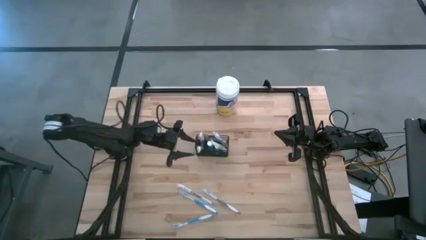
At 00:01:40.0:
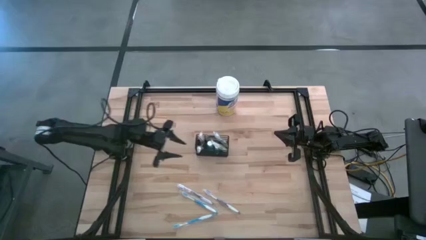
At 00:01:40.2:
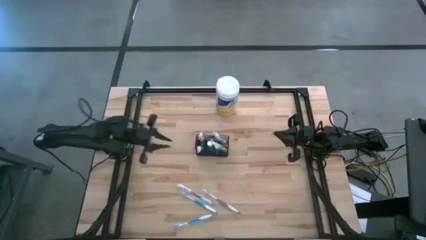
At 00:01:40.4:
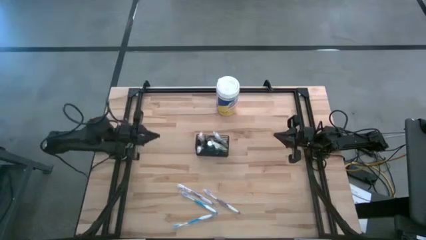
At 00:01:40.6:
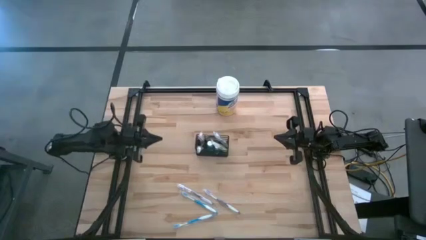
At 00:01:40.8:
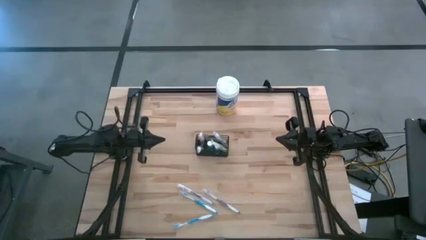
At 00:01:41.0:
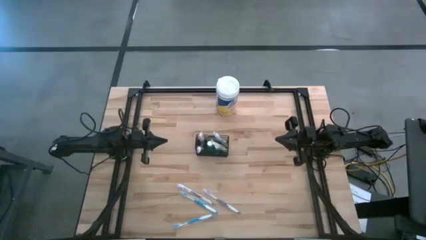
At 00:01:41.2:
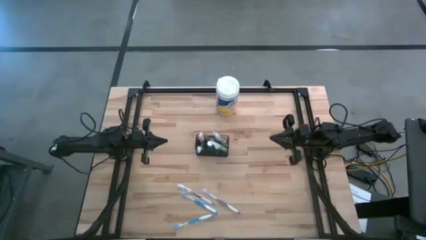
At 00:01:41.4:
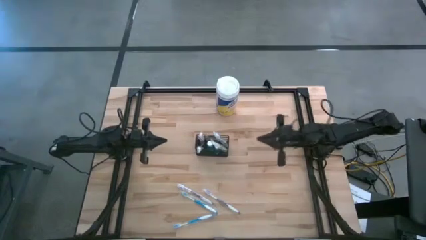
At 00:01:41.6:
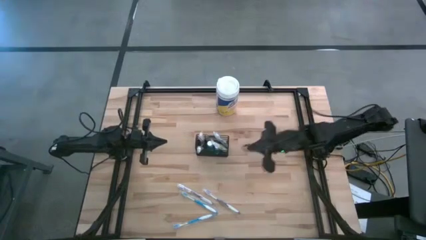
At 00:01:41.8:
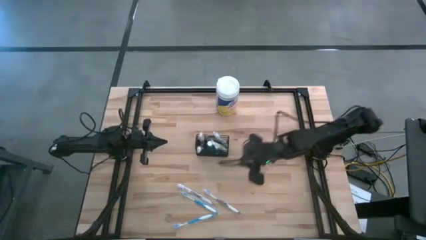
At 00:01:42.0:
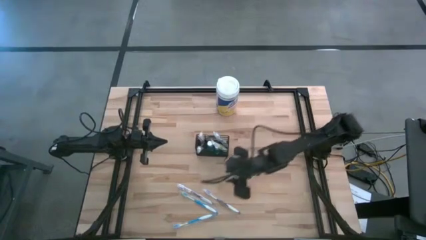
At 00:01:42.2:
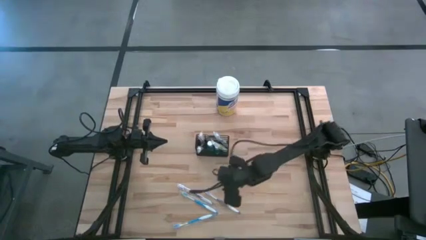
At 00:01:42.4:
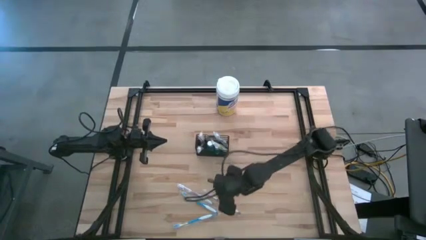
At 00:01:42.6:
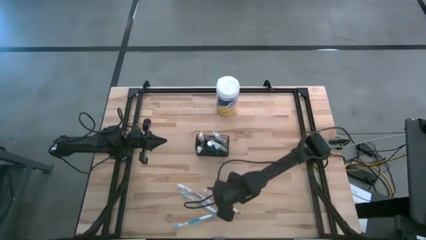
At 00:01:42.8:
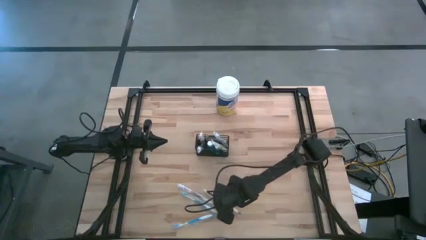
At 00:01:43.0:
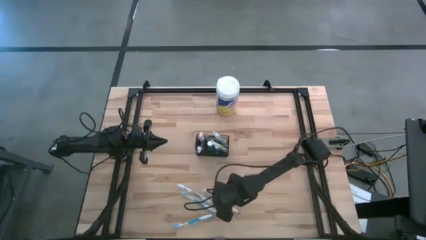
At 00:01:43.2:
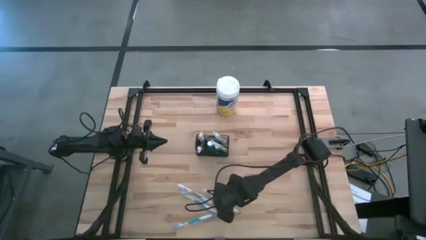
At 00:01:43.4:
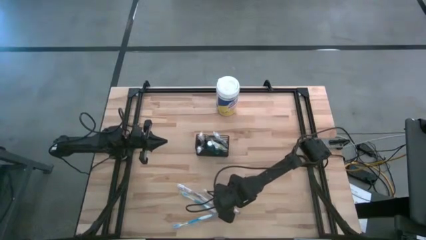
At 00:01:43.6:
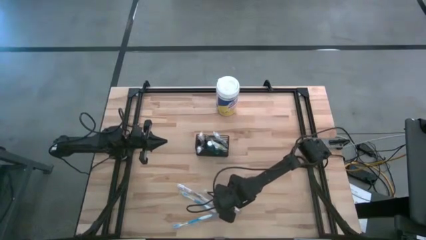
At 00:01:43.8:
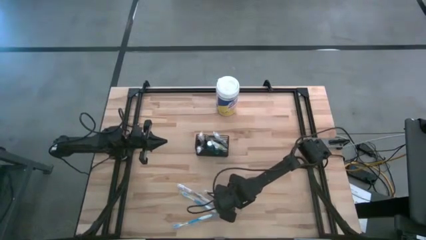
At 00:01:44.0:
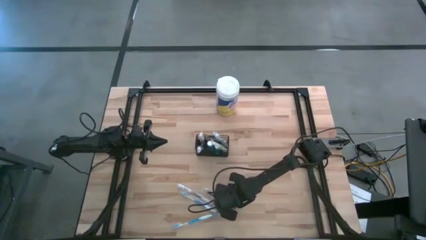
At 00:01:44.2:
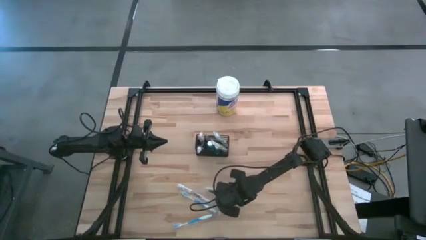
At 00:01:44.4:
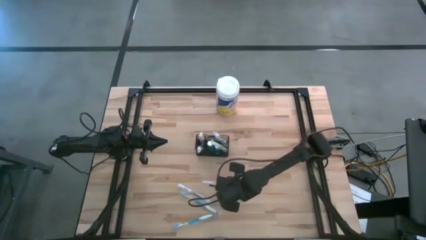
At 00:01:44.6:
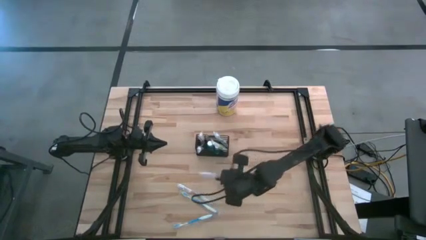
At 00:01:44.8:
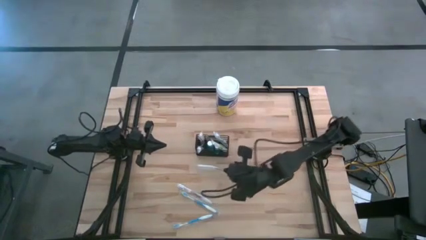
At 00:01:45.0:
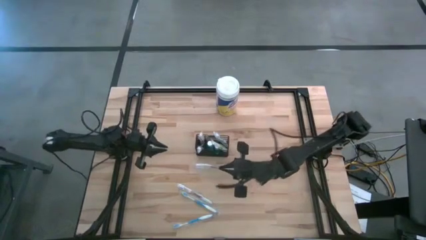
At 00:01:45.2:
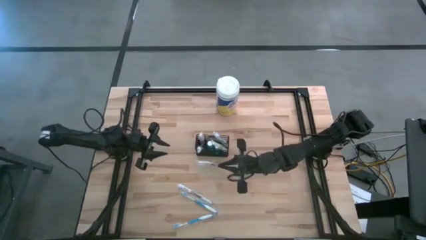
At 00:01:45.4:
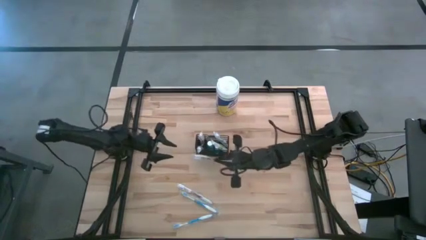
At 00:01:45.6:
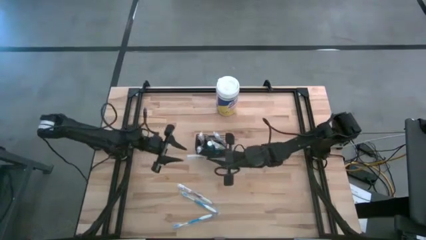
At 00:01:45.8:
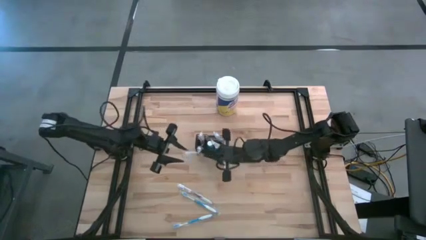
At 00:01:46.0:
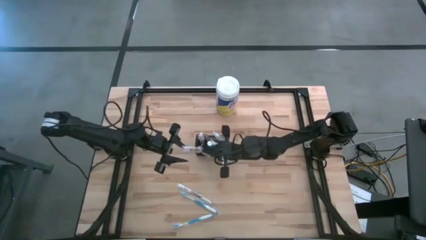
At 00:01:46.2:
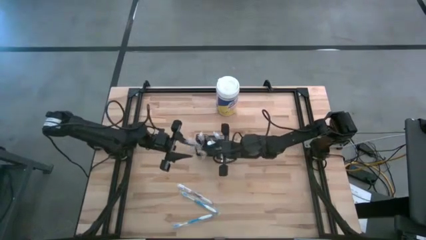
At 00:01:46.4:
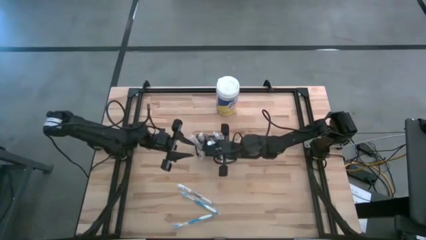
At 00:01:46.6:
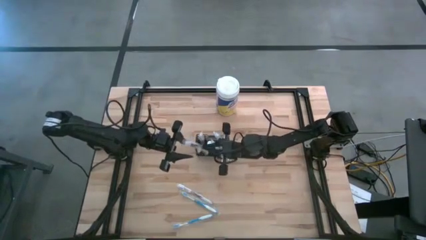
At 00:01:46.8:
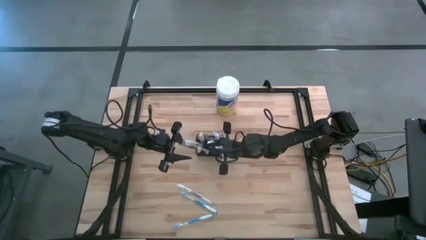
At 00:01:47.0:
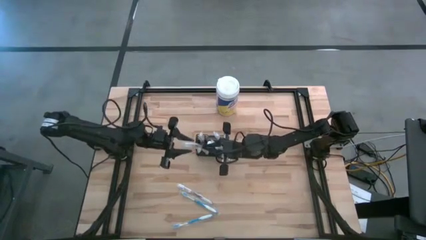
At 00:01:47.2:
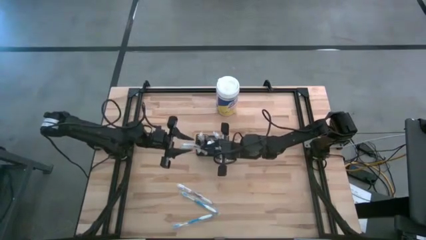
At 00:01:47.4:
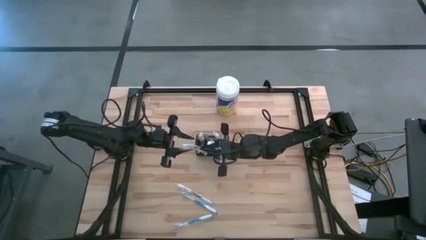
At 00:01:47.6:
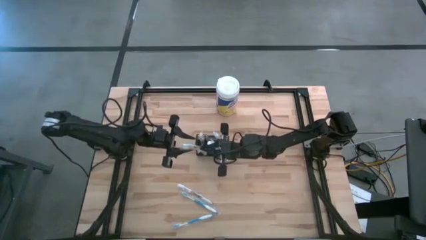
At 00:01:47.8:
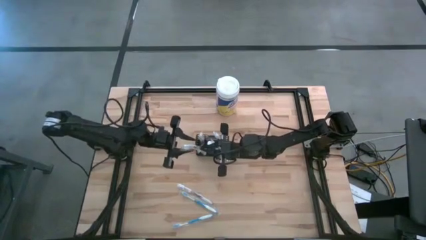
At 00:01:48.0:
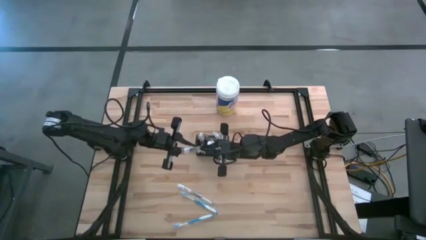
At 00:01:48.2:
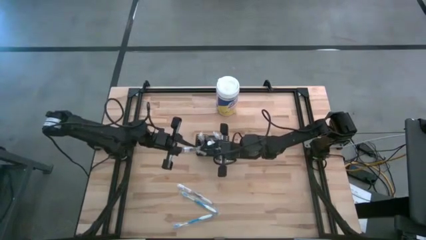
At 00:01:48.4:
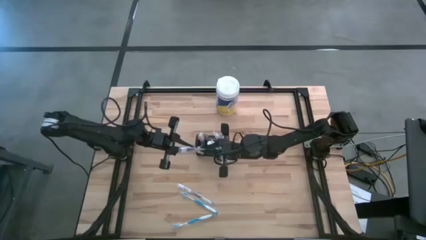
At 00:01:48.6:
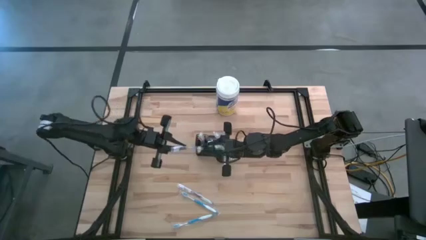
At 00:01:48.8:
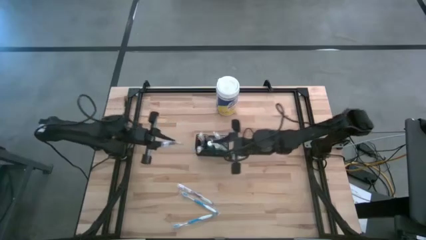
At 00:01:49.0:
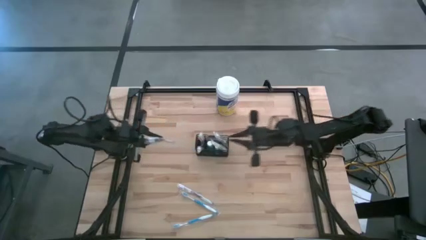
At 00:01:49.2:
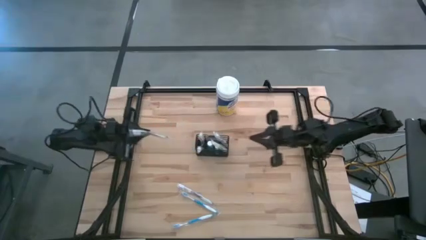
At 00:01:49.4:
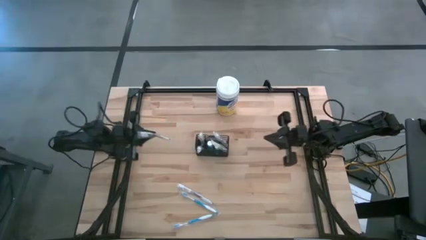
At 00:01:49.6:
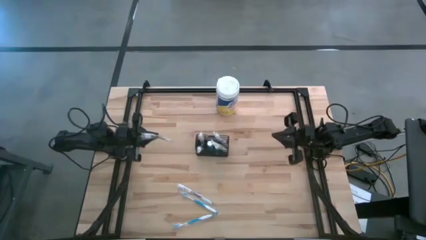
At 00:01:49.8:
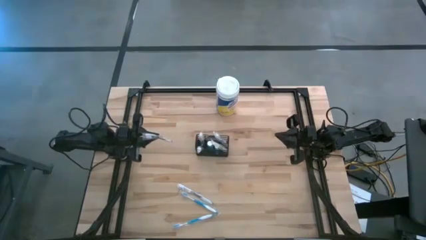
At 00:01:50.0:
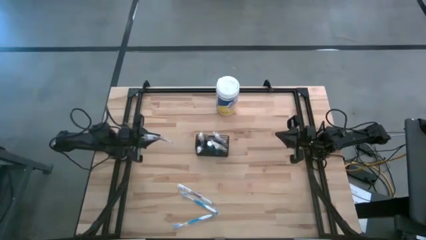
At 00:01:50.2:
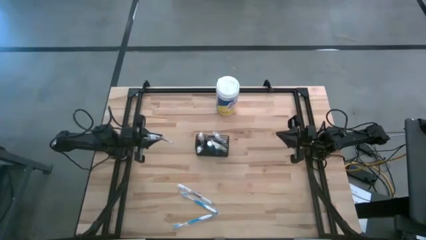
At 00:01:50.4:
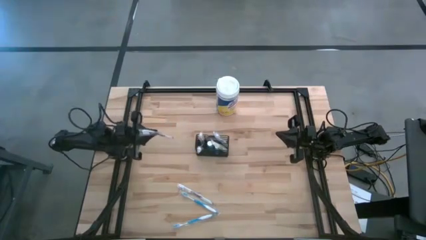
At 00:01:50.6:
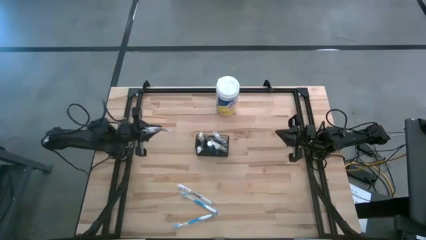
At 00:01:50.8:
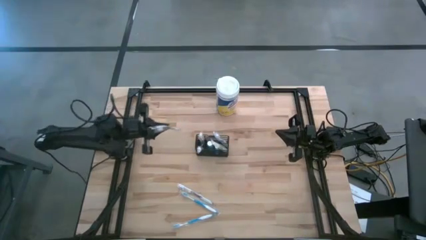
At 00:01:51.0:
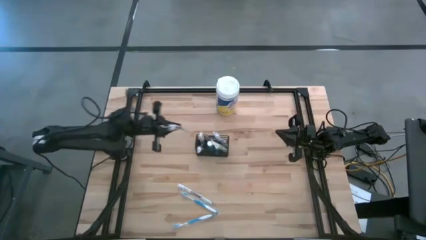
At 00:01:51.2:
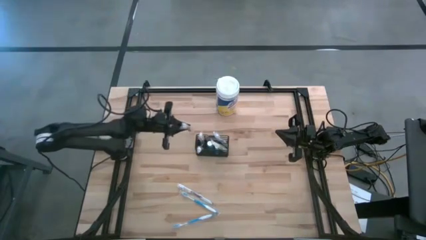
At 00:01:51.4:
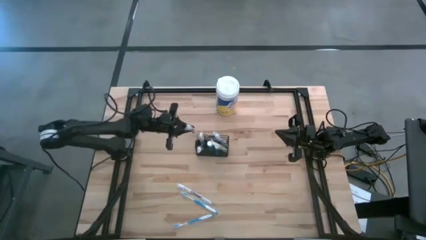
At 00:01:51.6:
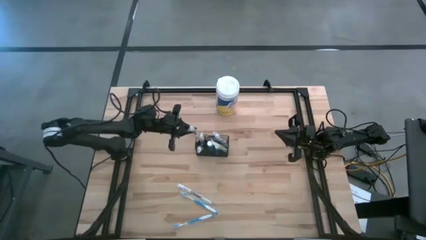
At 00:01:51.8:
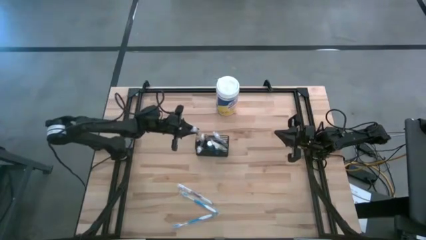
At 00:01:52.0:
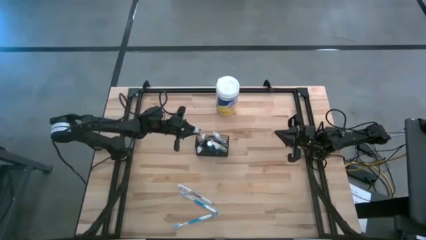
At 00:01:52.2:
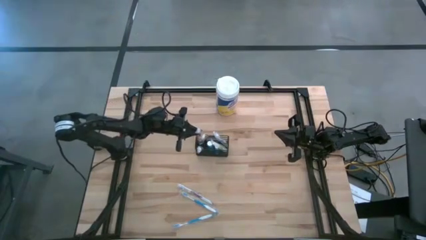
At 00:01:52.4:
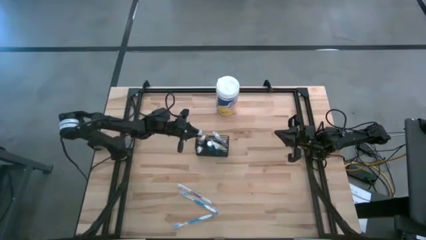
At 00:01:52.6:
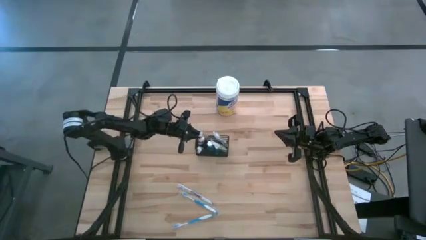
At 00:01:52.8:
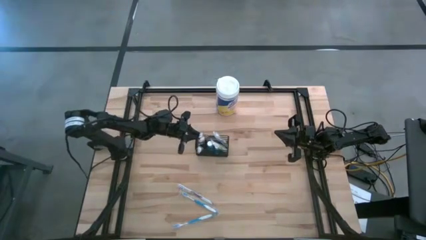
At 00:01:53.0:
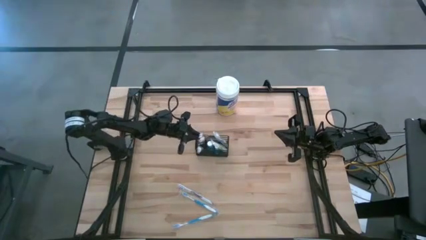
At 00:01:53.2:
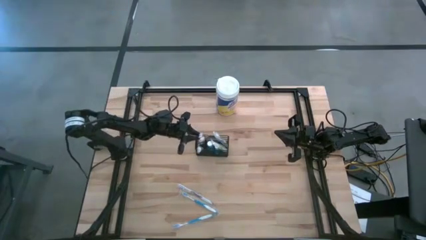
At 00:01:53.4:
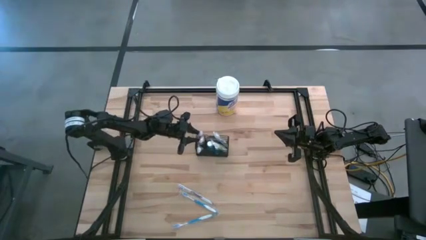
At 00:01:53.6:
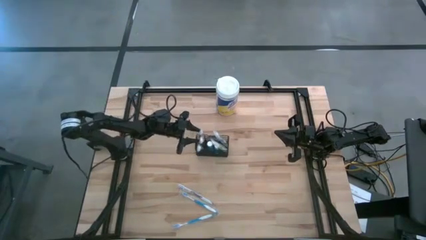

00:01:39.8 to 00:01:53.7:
Task: Pick & Place toothbrushing station
Put the right violet toothbrush into the black wire organizer
